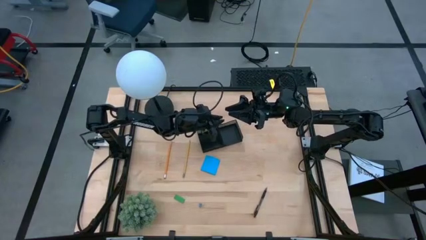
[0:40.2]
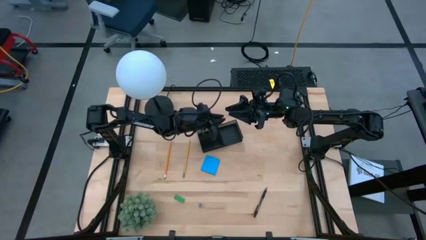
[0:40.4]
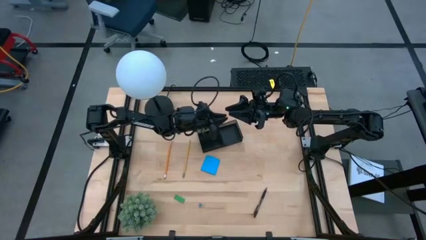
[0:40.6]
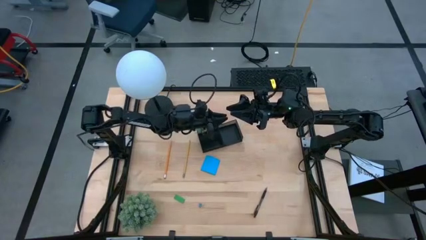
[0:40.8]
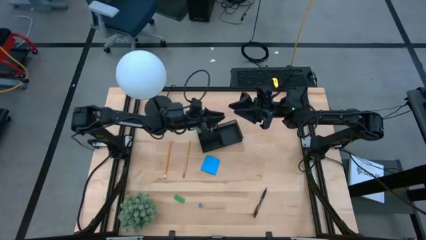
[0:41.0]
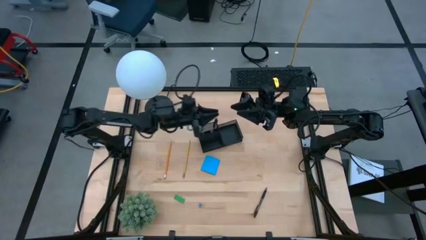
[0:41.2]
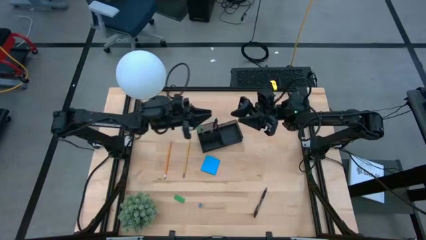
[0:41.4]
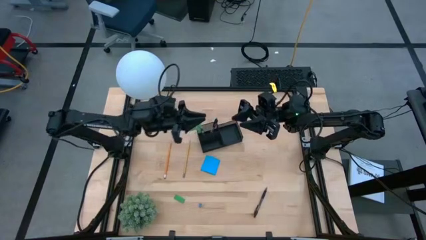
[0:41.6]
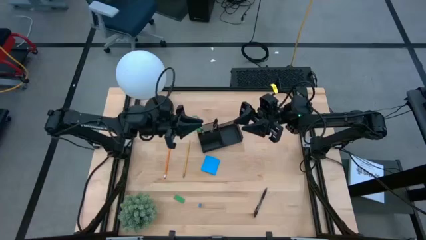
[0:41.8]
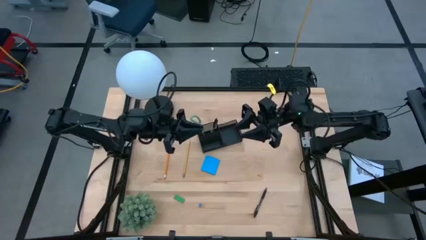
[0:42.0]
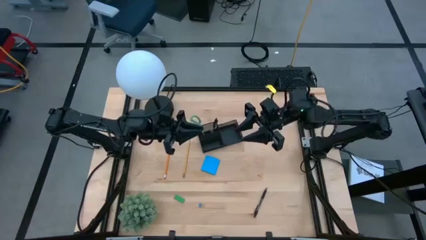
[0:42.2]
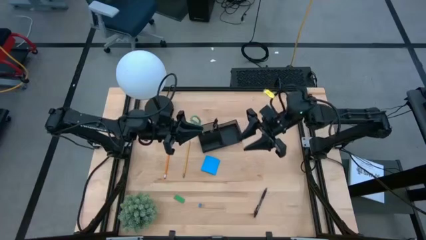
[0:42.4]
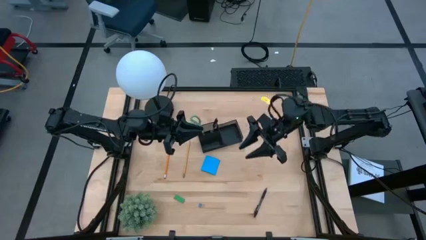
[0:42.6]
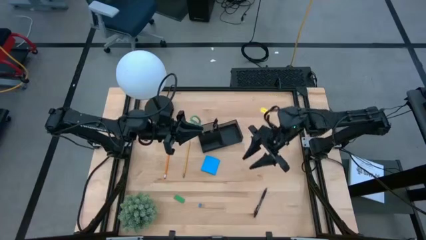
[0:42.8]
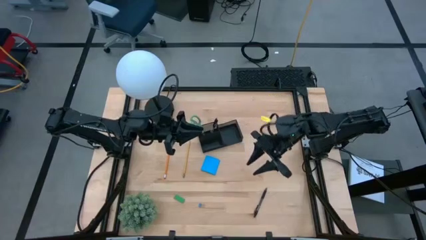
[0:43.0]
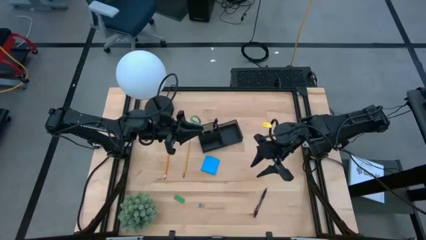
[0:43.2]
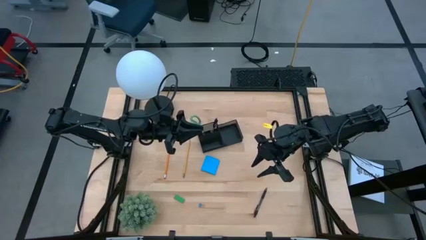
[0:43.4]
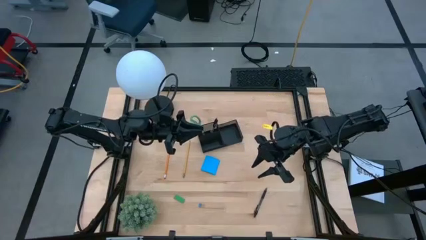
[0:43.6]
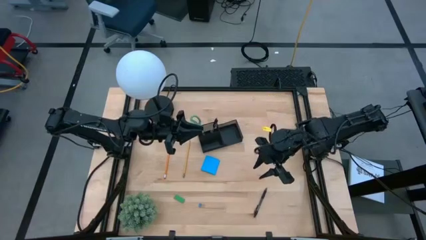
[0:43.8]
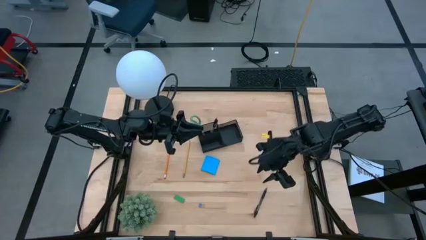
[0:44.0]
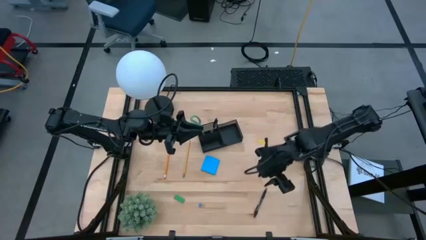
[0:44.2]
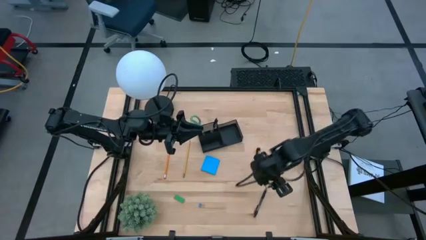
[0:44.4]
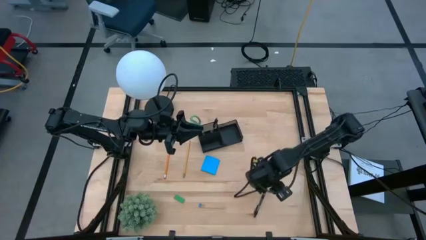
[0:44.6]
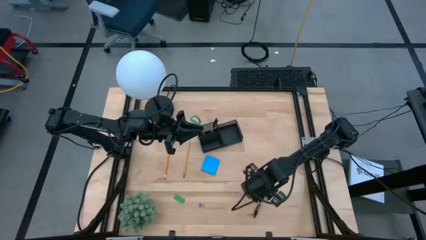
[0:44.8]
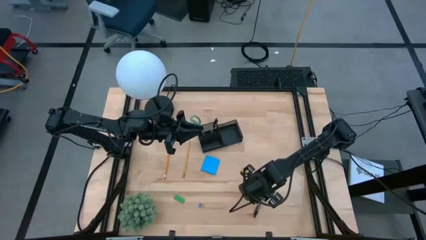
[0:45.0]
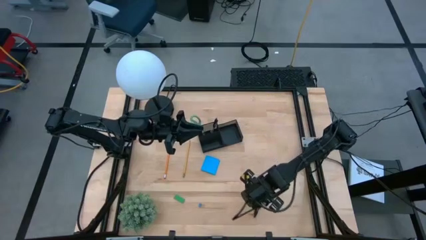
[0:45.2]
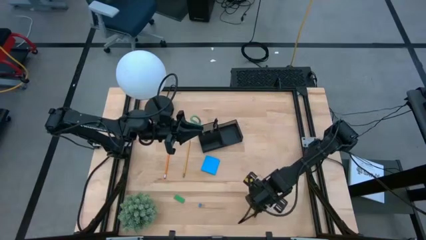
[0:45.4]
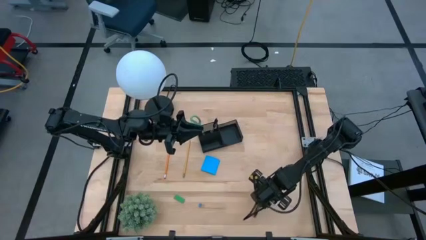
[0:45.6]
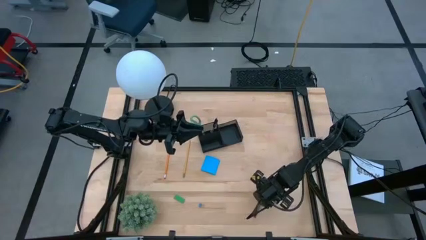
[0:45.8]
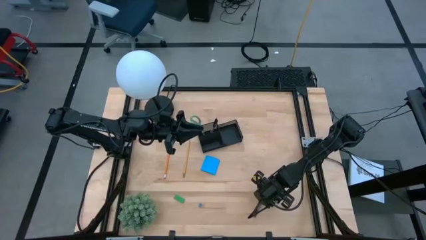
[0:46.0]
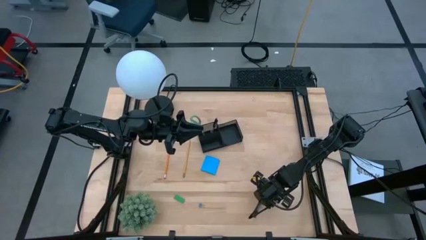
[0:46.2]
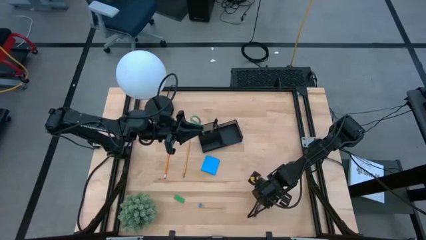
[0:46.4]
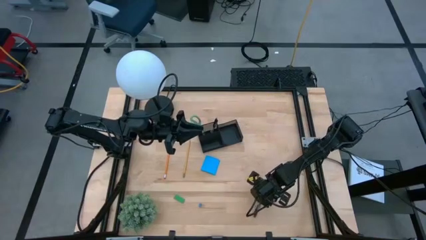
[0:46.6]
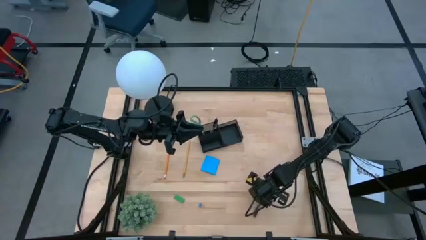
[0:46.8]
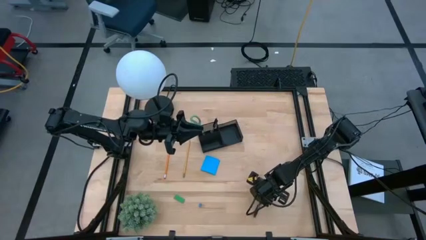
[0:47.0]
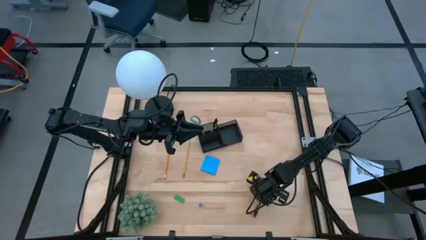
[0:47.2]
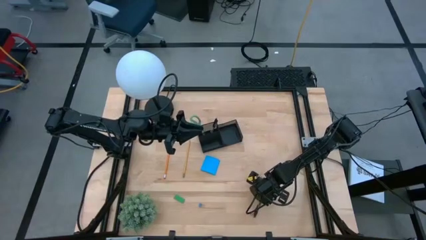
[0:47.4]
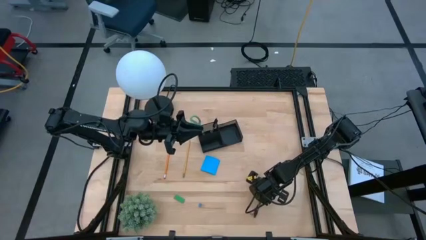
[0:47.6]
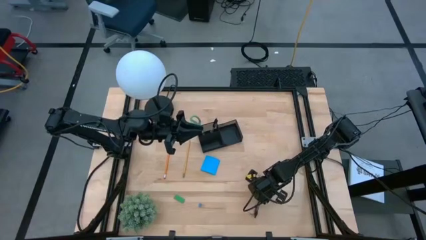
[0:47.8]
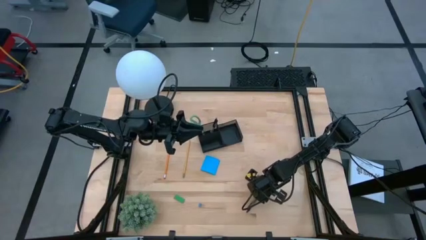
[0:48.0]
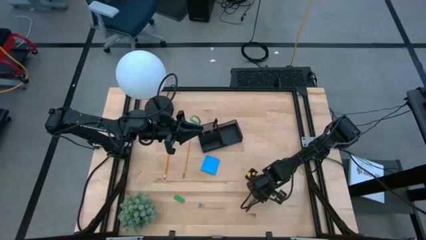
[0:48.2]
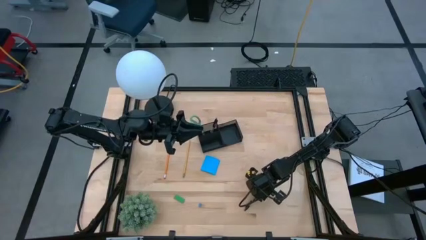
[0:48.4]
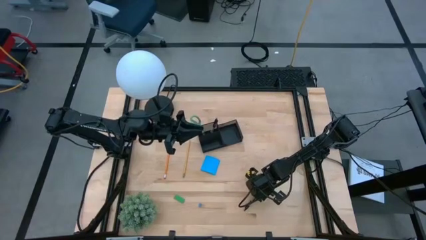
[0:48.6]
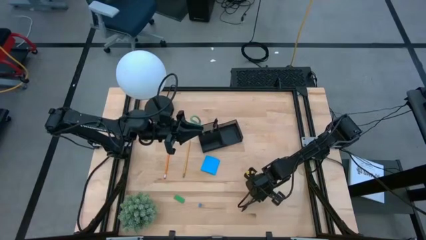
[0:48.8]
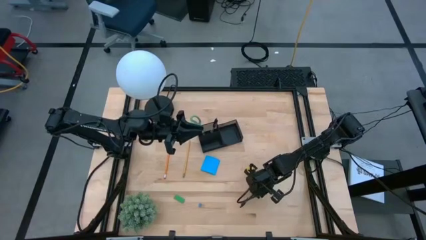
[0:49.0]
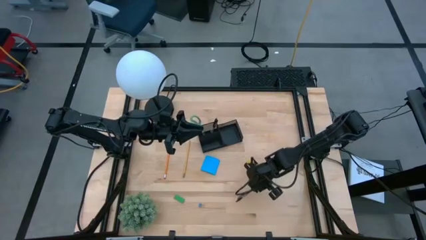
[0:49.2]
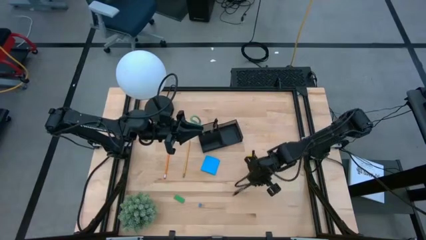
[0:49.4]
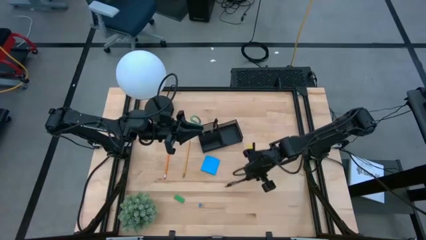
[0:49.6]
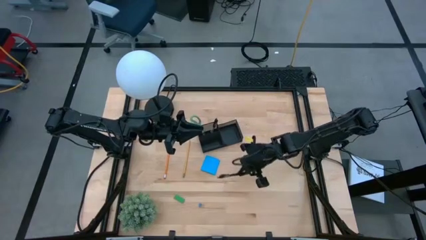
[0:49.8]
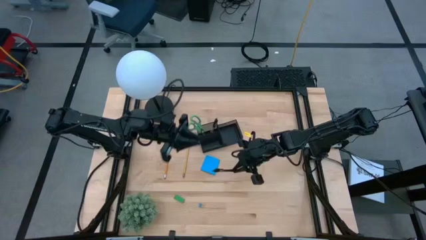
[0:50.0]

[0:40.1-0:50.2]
Task: Pick and place office supplies into organizer
Put the black pen into the black desk organizer

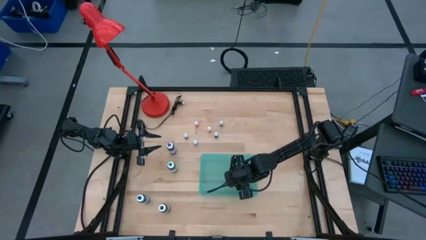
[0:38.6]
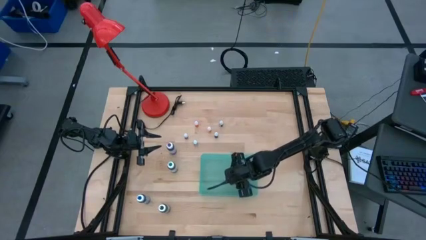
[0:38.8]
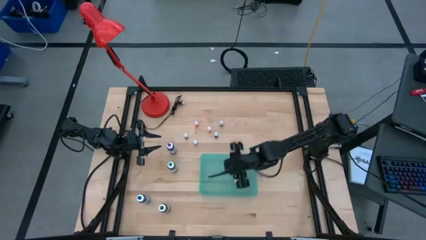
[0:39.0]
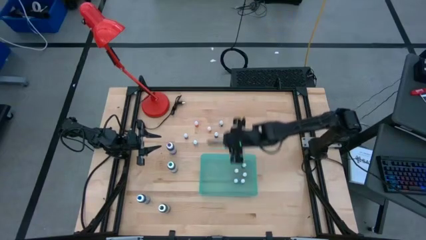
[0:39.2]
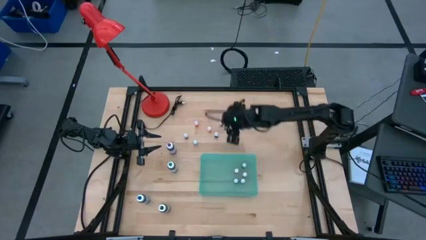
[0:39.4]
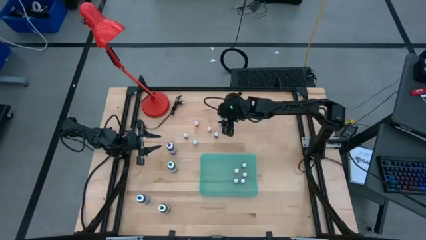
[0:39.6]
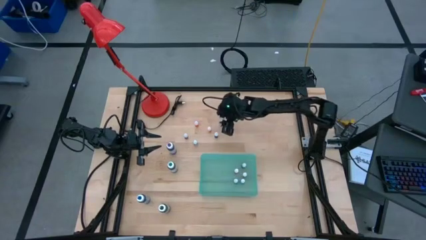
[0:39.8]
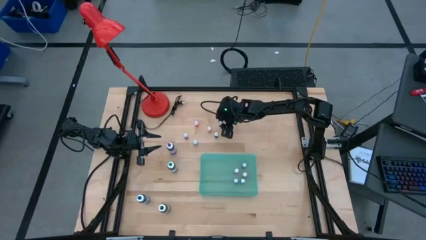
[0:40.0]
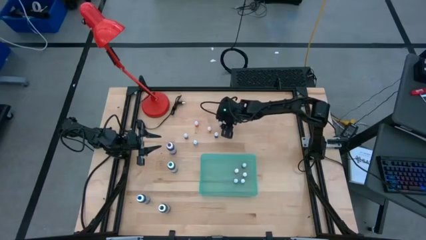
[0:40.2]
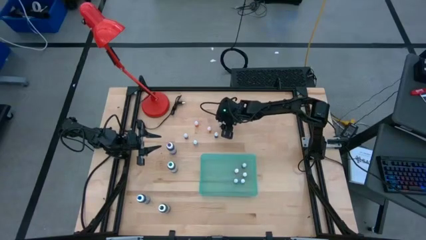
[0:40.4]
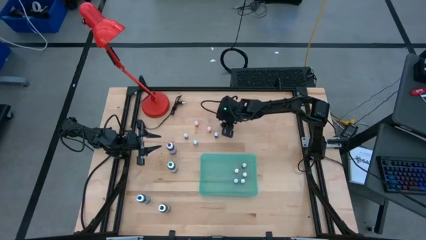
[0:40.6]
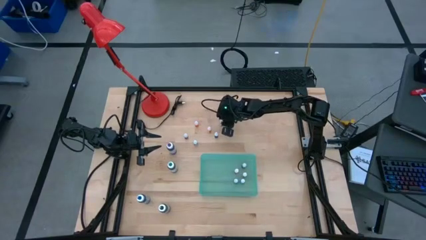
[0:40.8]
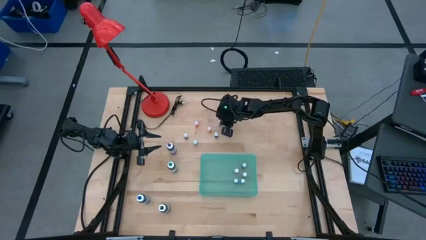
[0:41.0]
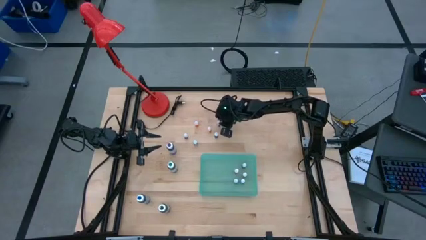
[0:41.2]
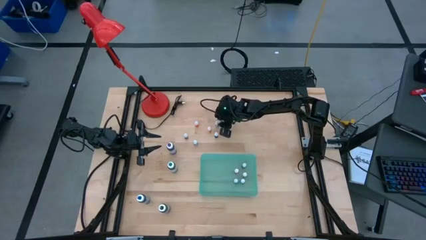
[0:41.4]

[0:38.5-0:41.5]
Task: Pick & Place food coloring
Put the small blue food coloring bottle into the green bin

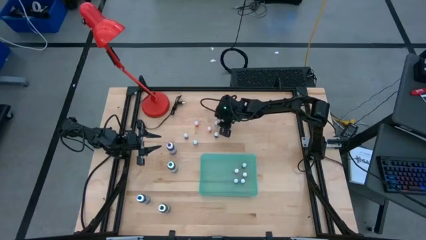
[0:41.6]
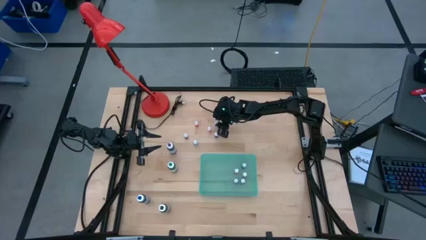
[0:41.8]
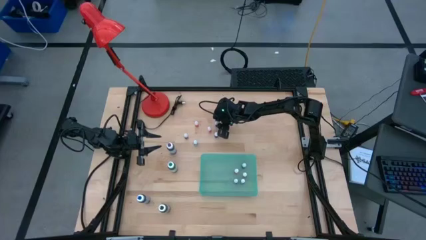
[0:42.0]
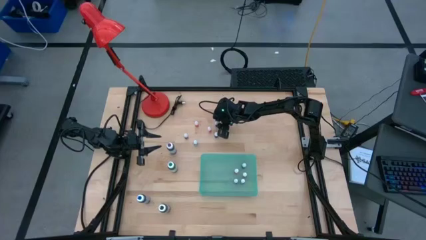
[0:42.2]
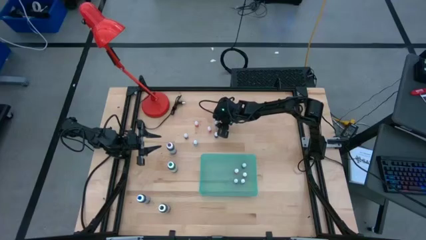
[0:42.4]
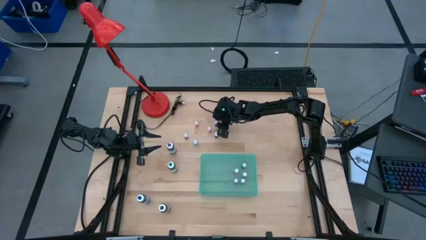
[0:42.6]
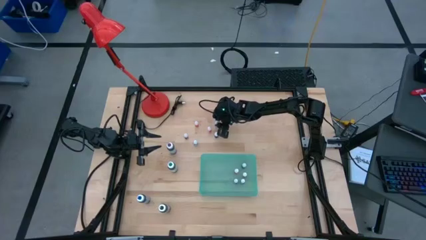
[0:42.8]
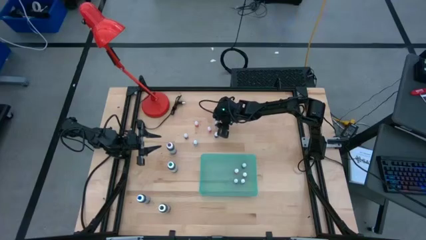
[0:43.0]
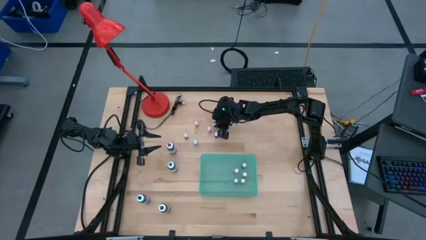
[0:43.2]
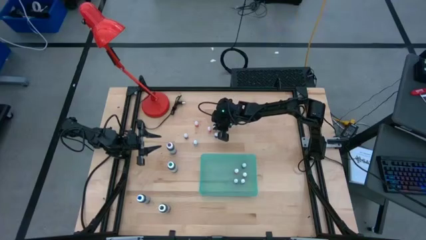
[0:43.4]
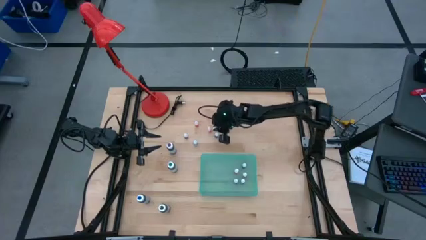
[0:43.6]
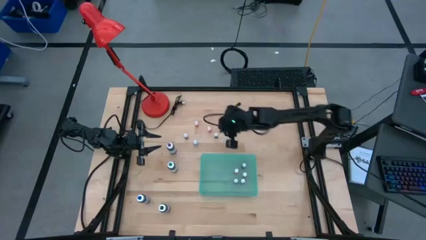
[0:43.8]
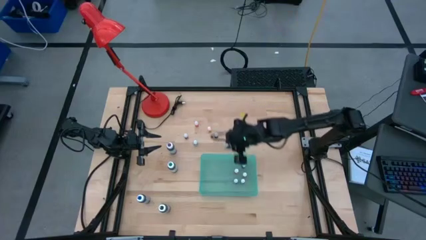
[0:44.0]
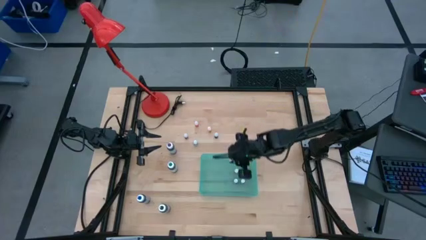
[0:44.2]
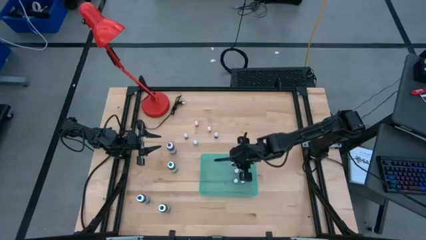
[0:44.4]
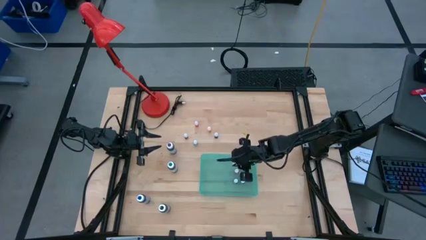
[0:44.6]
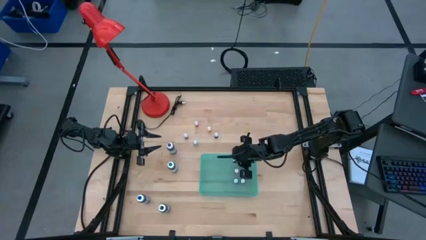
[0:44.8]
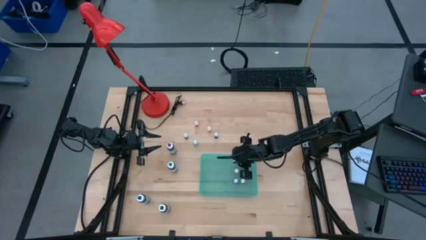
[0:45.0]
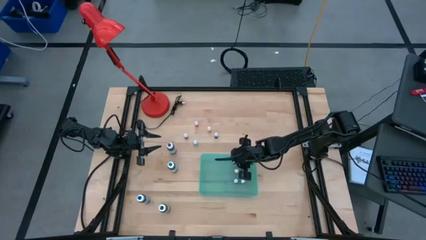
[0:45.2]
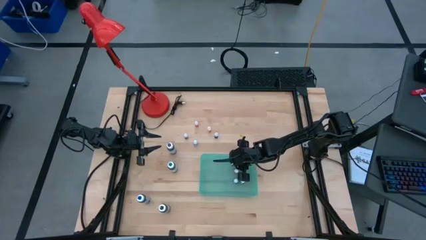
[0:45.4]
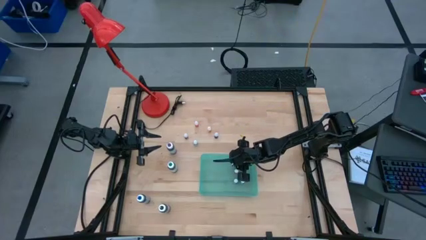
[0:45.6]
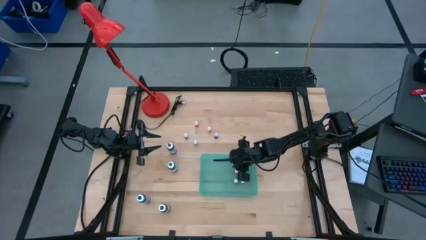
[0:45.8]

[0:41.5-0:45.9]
Put the small blue food coloring bottle into the green bin
